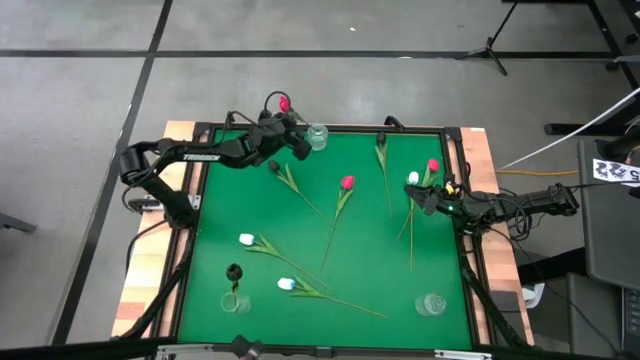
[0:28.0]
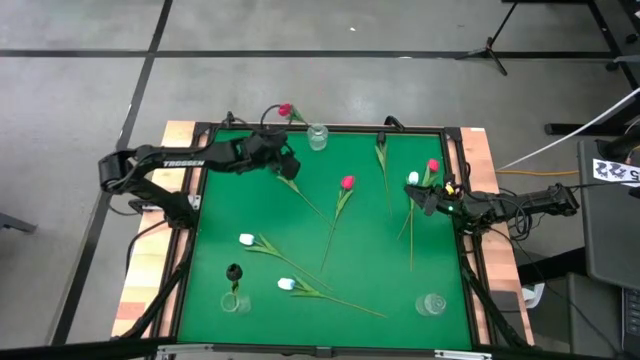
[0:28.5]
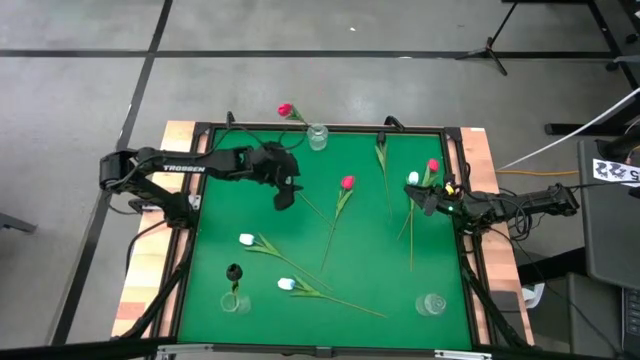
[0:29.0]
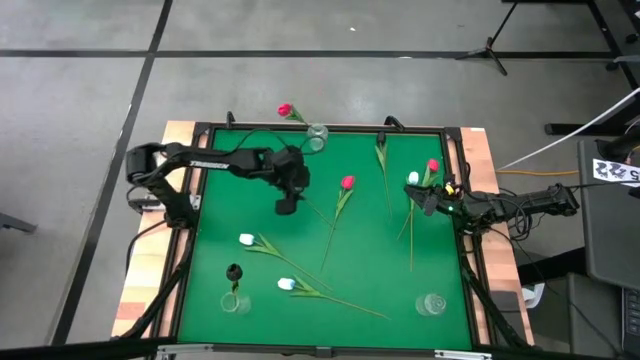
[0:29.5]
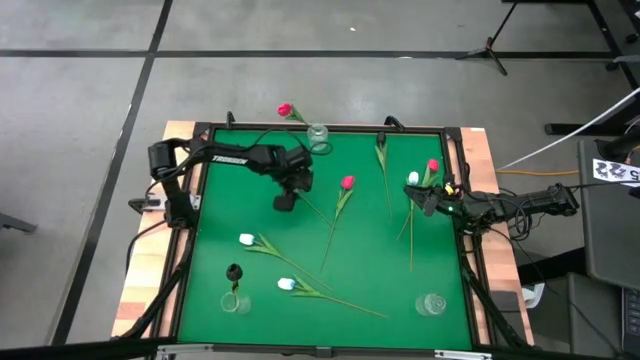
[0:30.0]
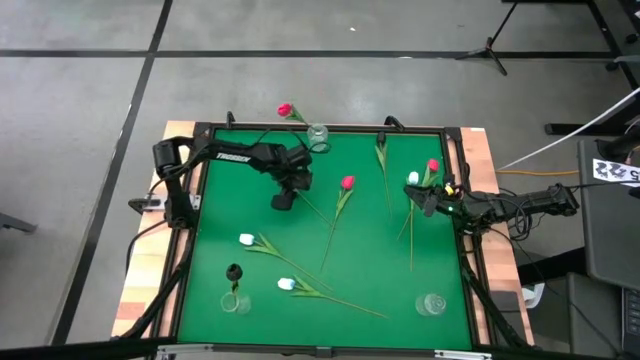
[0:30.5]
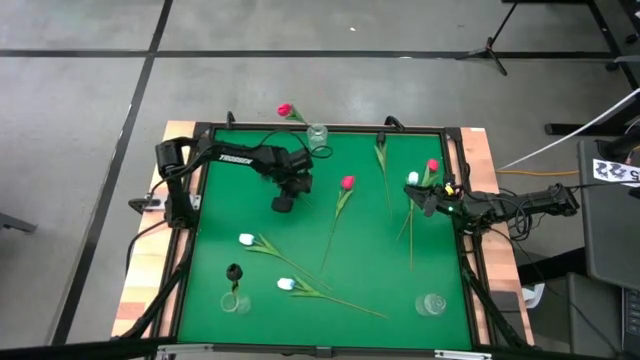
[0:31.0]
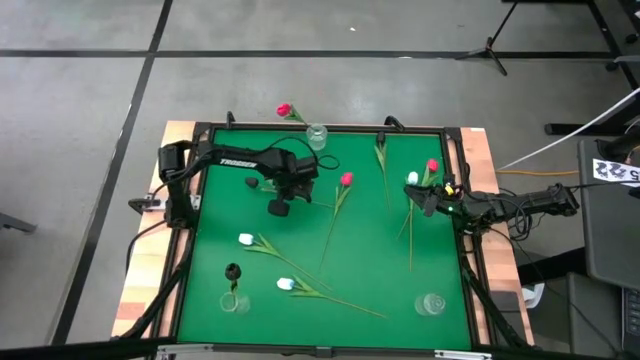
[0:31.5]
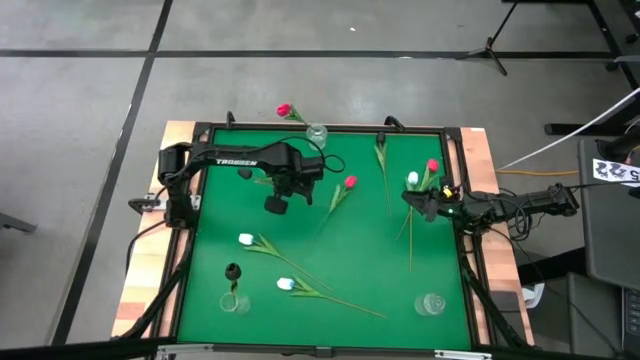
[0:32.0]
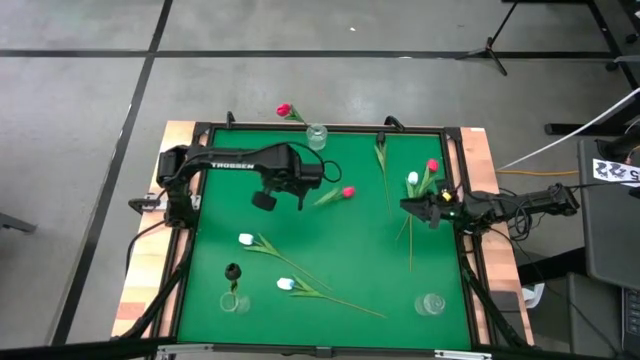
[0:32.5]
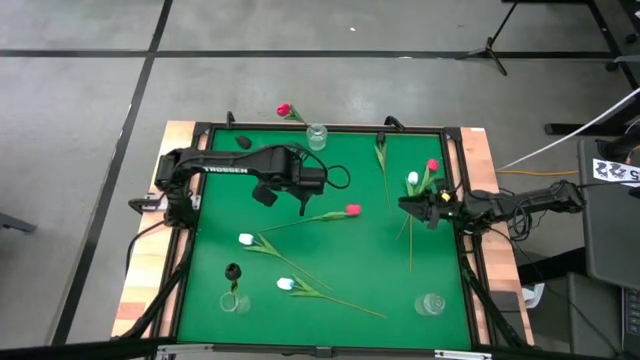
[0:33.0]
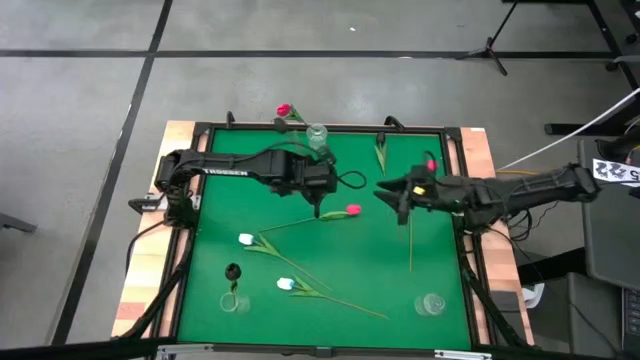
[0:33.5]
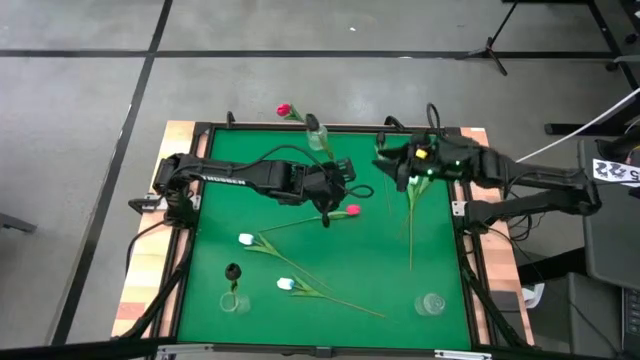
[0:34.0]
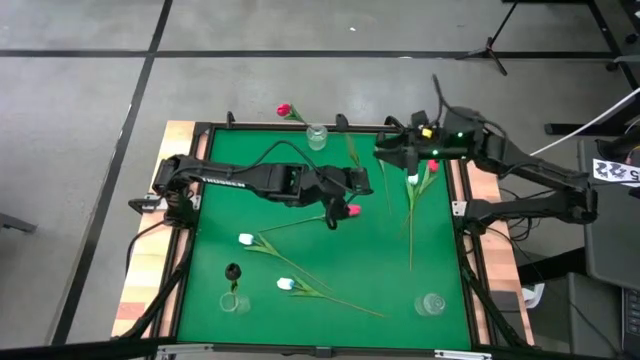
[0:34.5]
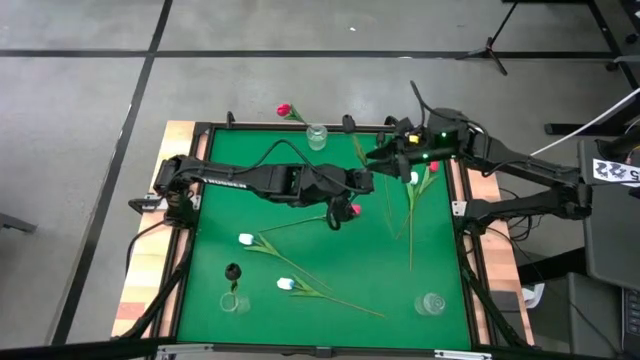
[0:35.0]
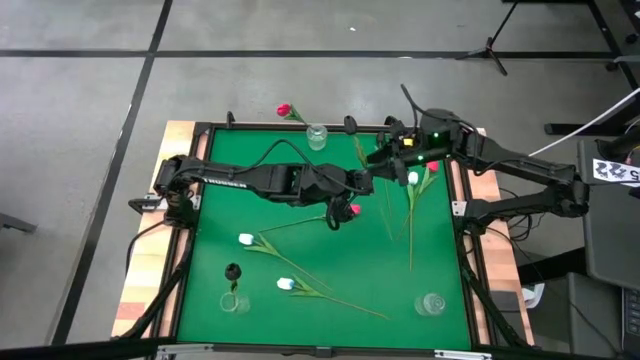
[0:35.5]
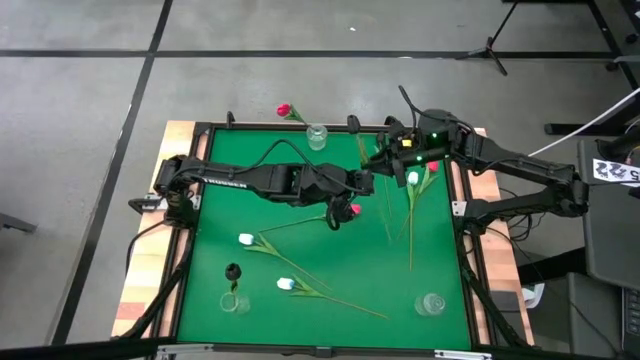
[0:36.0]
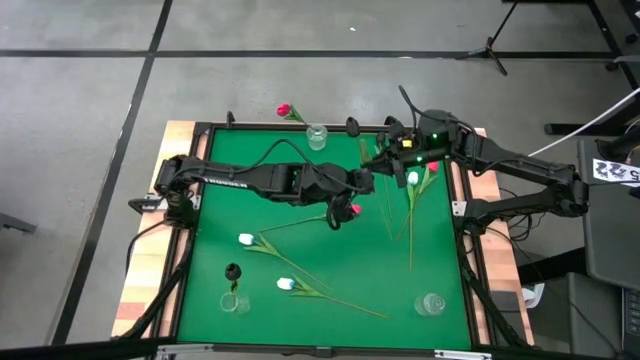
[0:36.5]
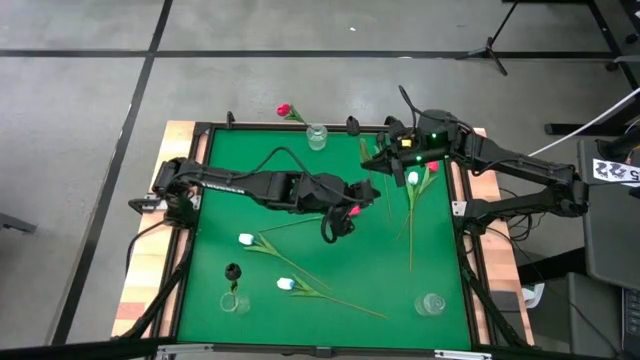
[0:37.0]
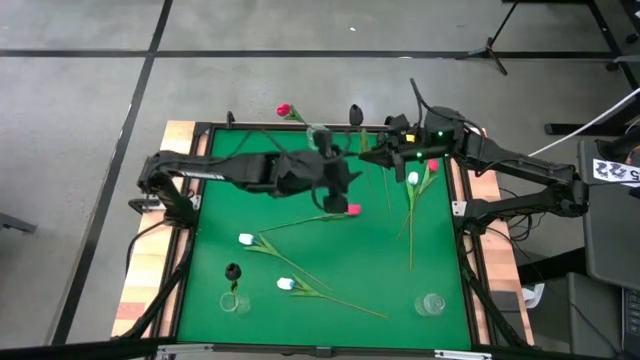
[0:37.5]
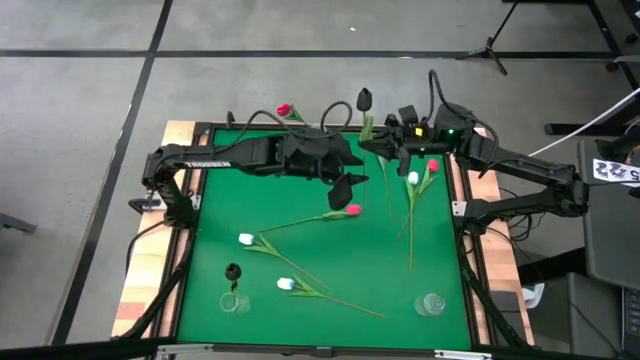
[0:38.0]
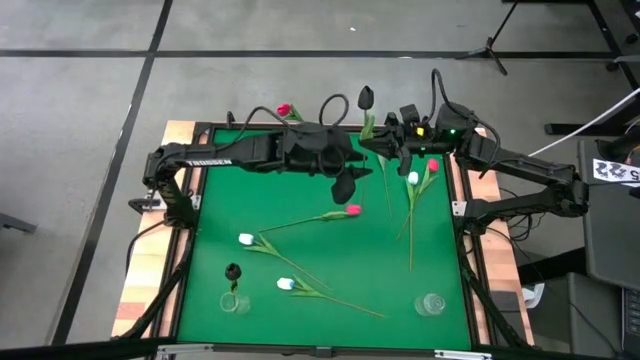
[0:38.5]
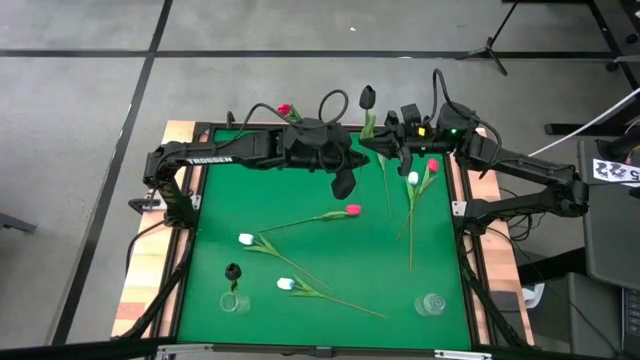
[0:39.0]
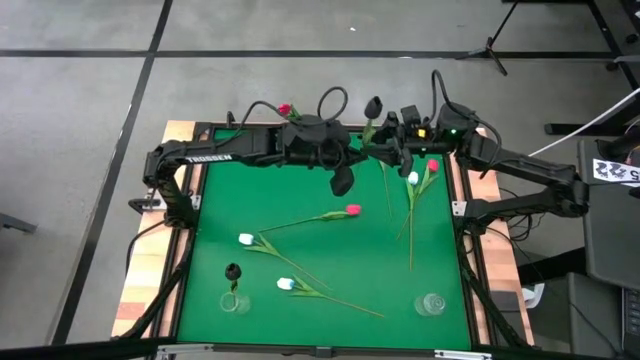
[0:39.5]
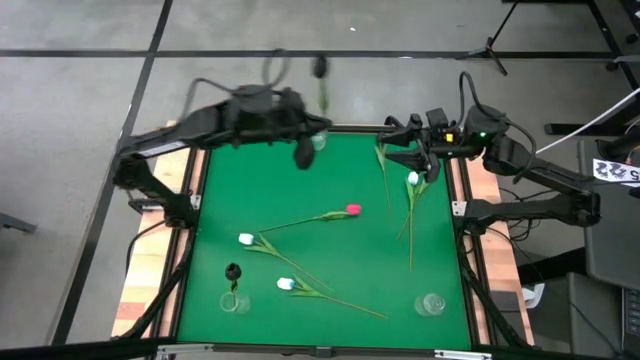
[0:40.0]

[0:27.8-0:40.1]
Task: Sort flowers into vase by color
Put the left black flower into the bottom left transparent vase

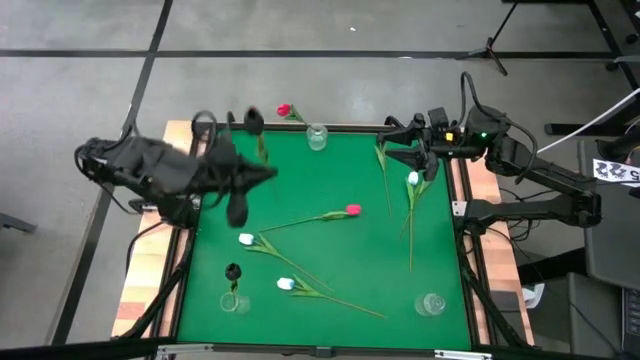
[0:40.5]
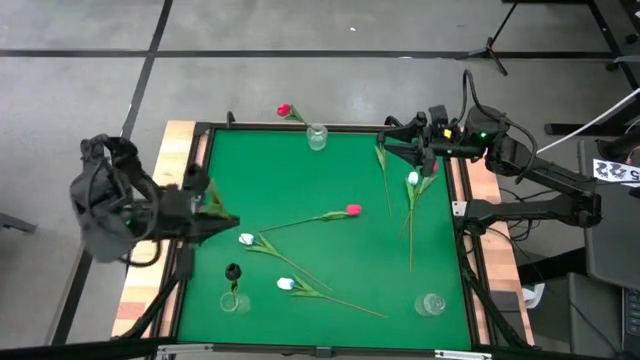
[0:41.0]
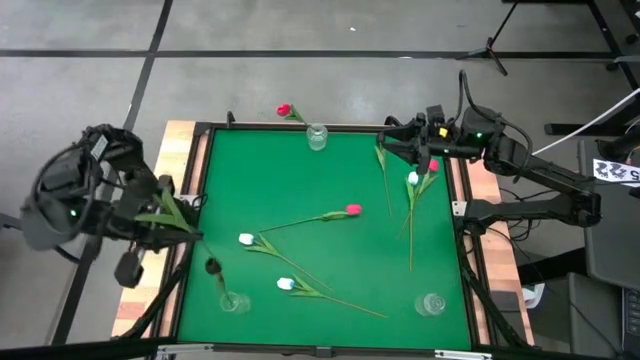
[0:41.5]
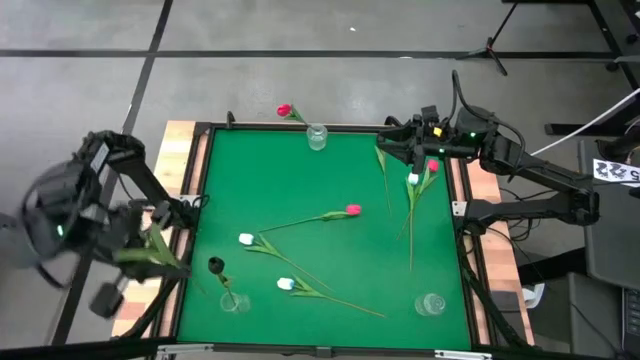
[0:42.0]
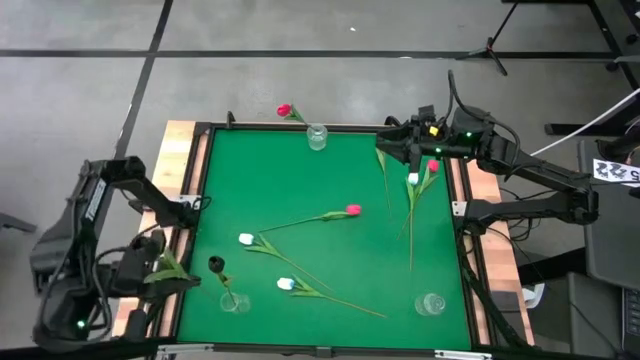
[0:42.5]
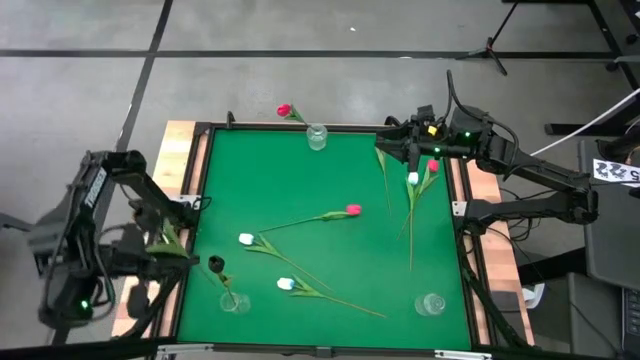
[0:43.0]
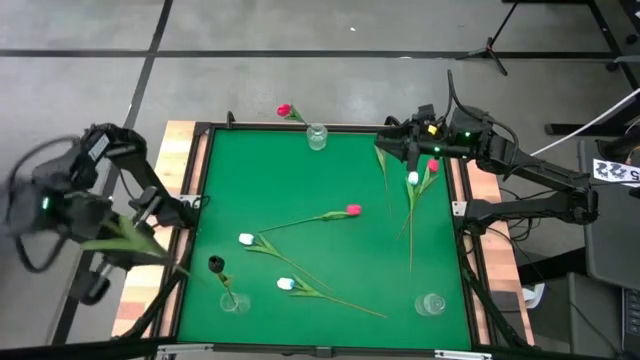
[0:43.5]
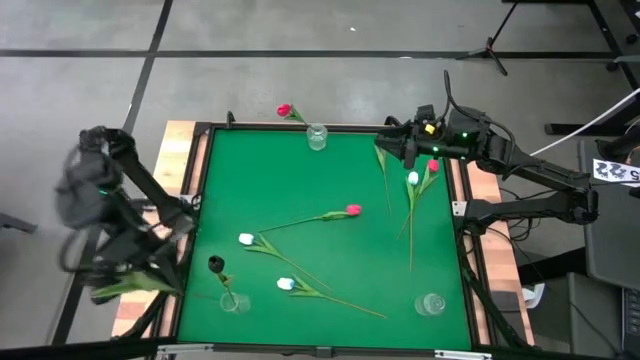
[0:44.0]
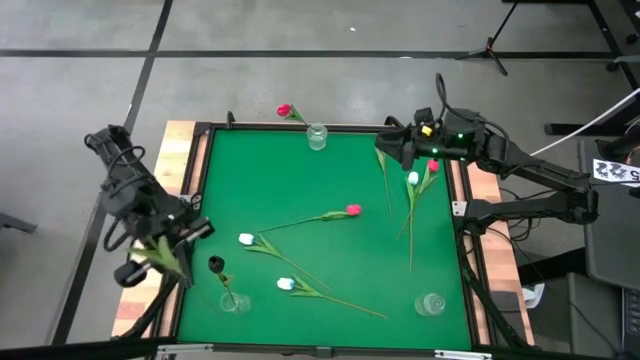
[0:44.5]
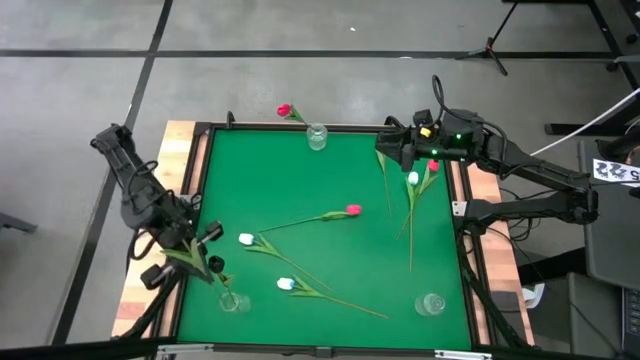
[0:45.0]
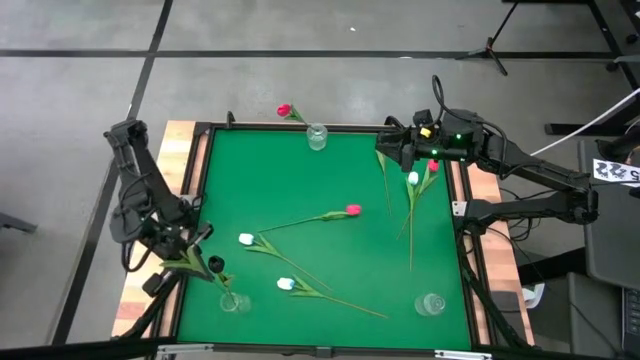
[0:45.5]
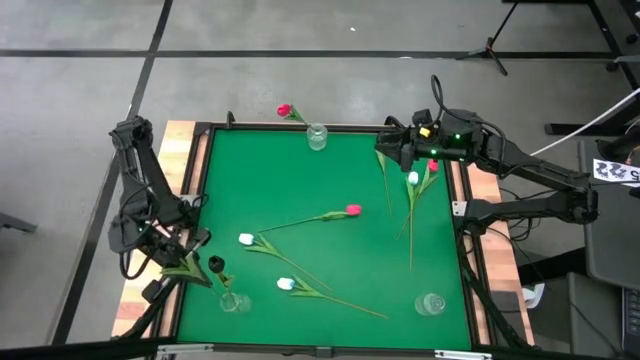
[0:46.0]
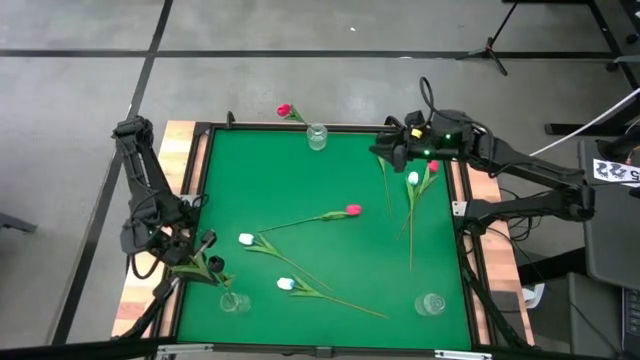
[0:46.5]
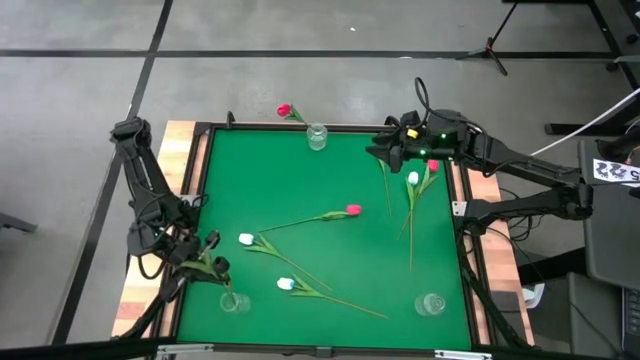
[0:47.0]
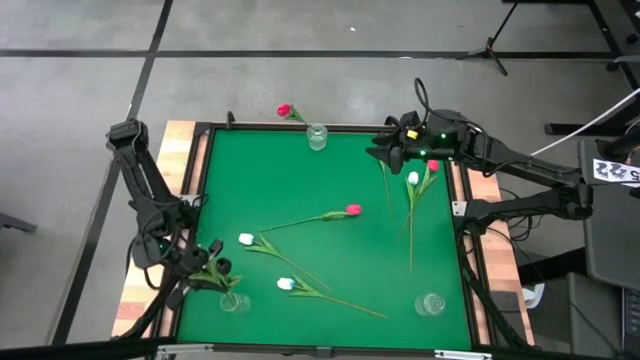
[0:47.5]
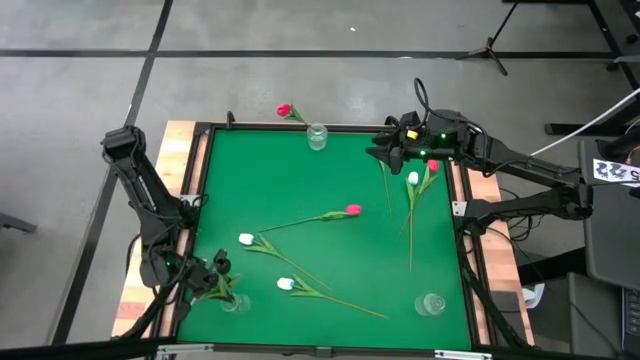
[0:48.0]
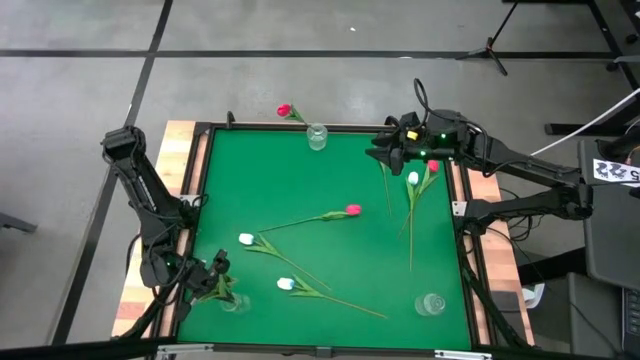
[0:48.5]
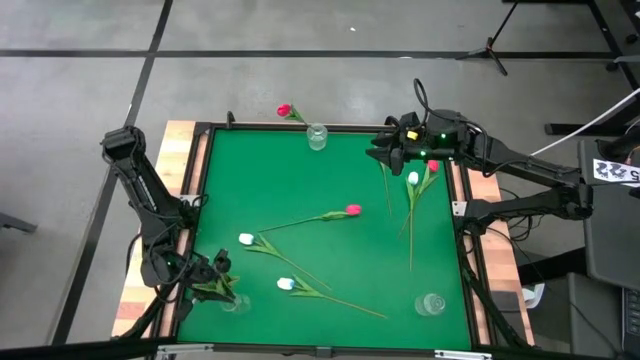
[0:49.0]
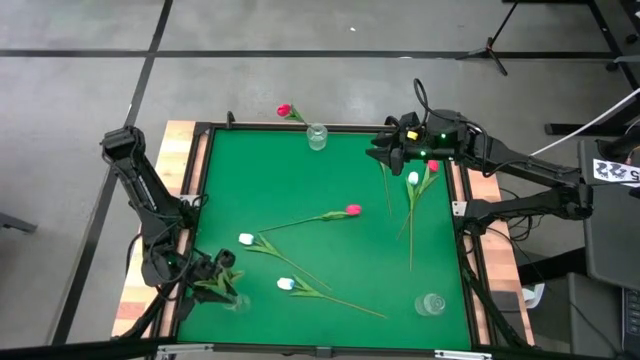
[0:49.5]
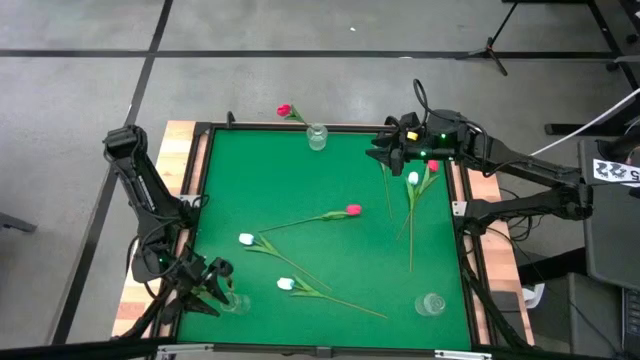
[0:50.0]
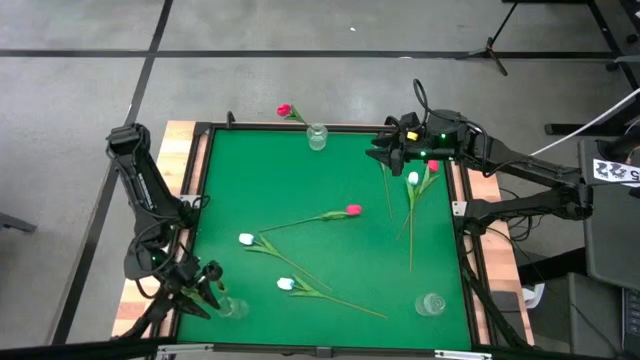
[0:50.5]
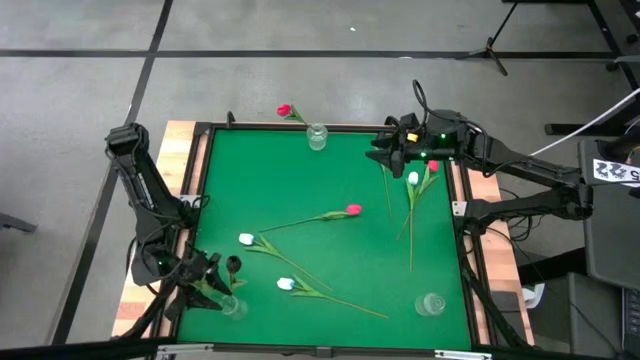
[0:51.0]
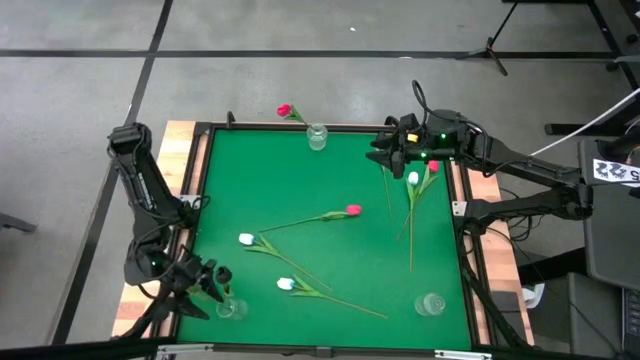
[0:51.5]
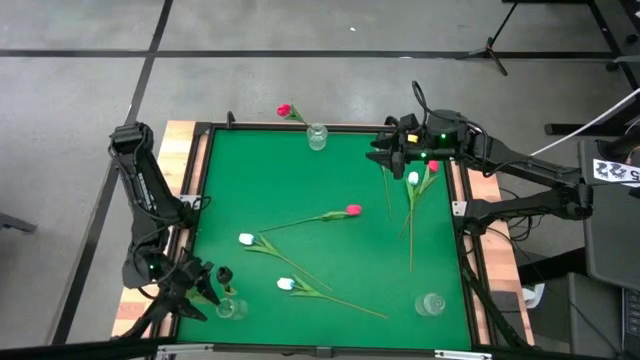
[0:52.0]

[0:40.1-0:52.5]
Put the left black flower into the bottom left transparent vase
